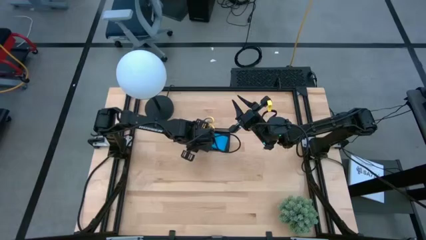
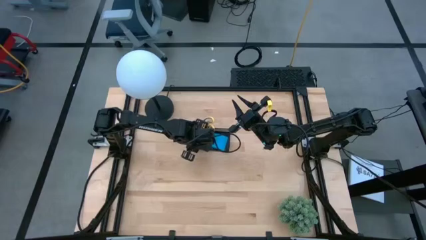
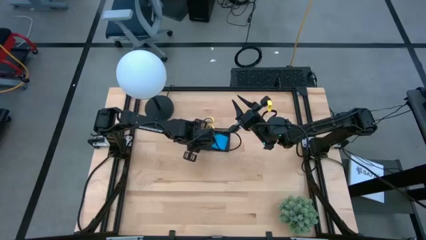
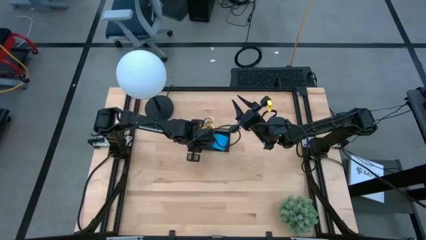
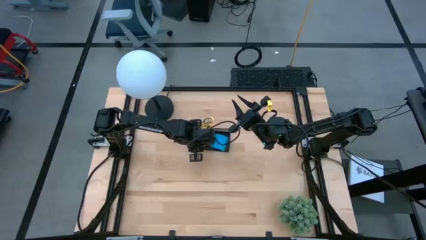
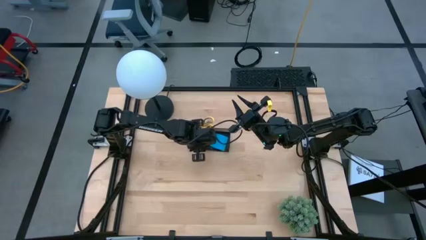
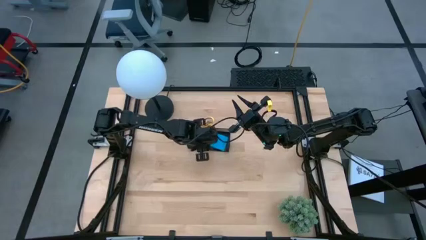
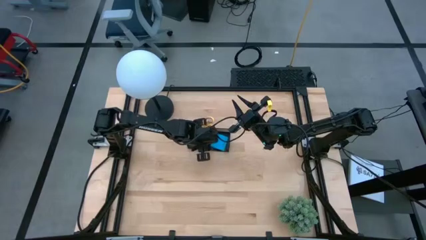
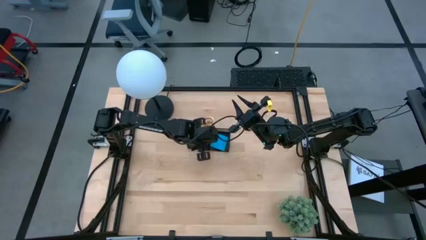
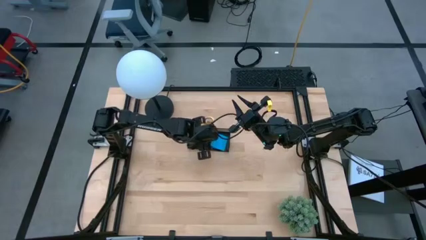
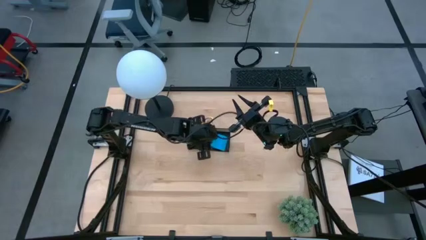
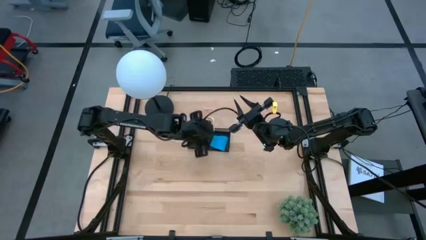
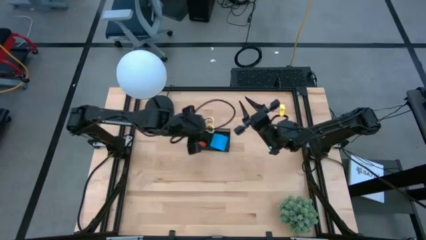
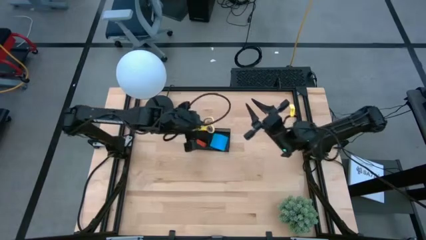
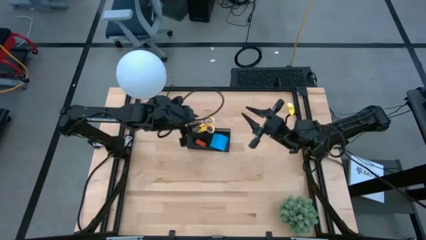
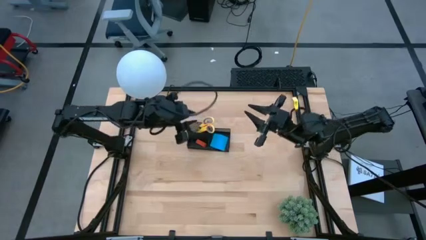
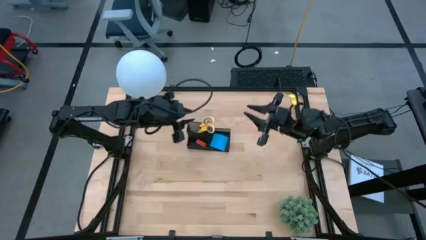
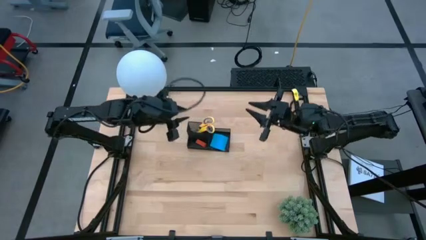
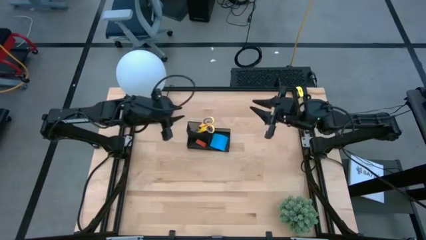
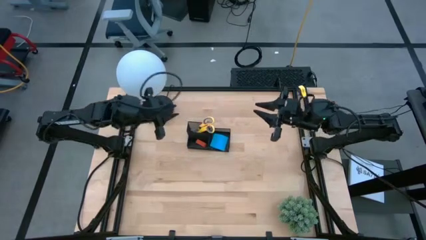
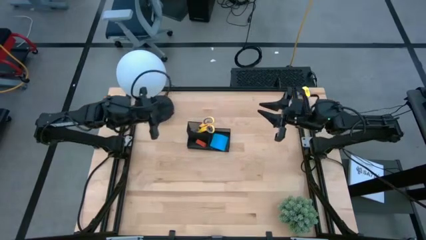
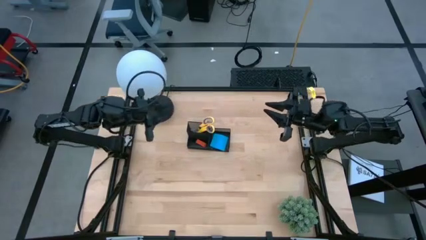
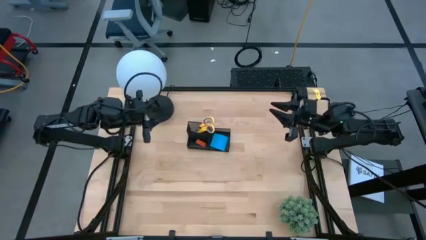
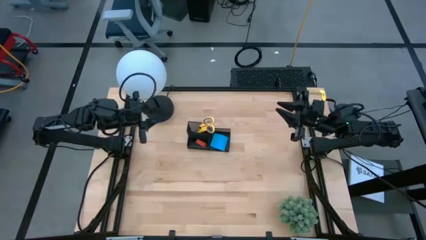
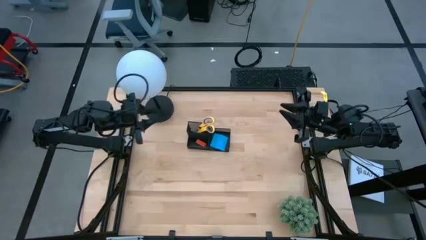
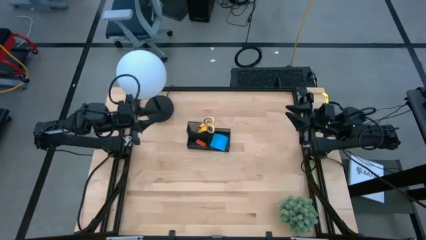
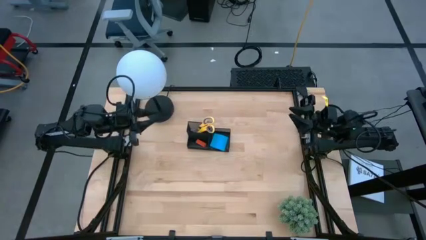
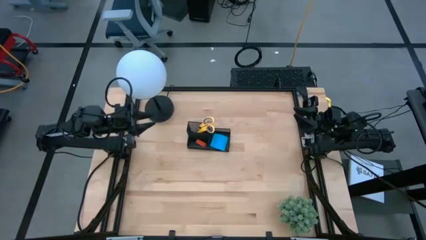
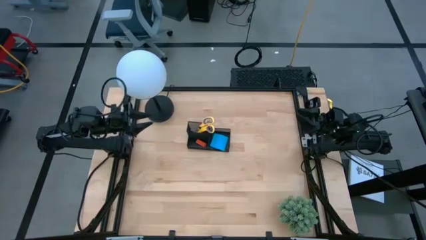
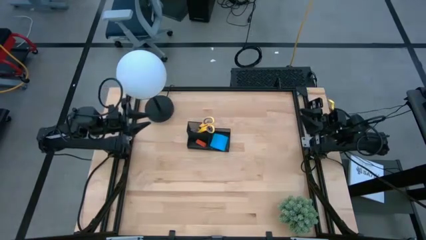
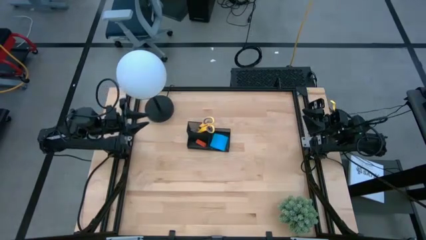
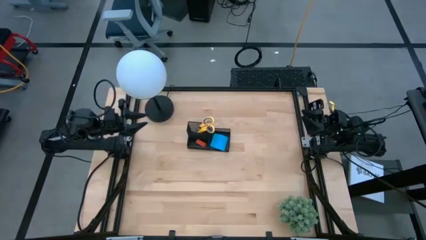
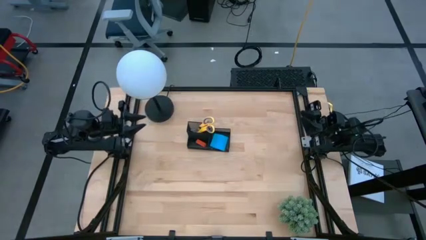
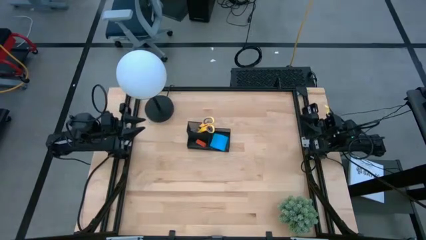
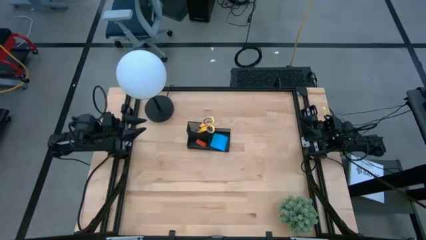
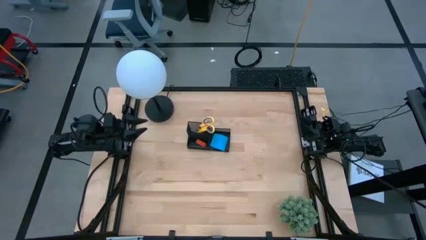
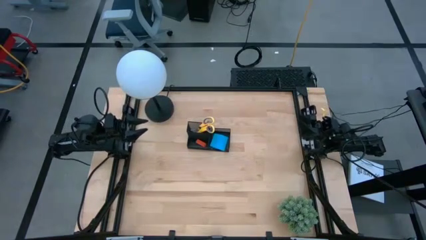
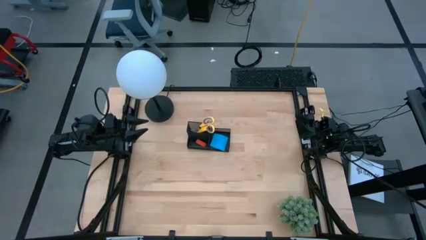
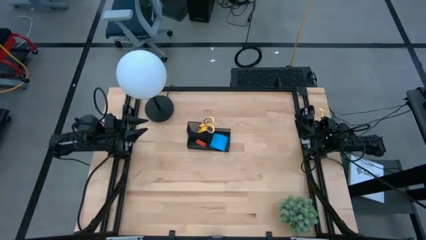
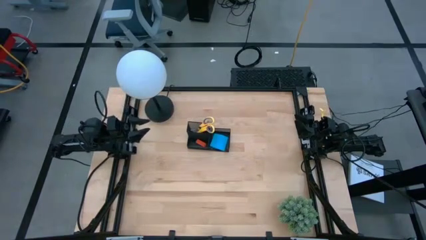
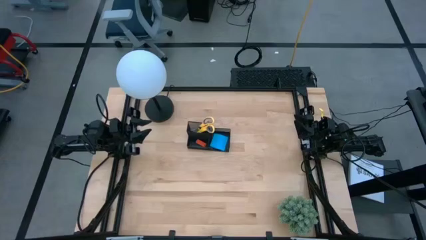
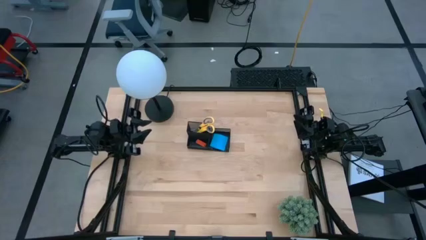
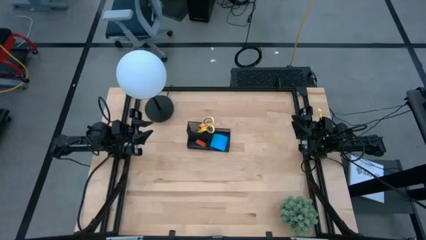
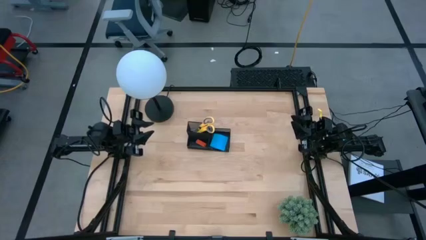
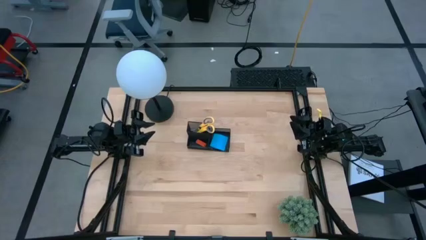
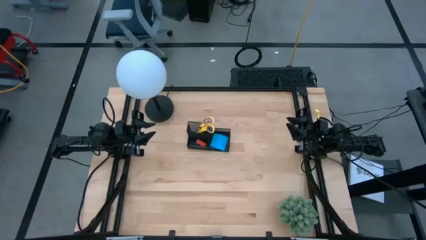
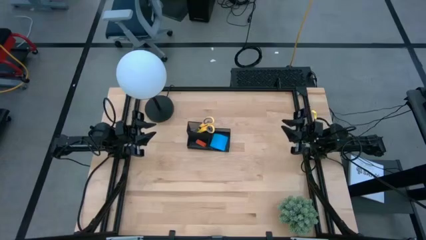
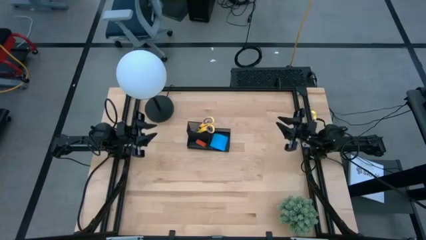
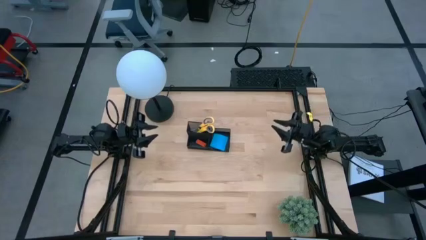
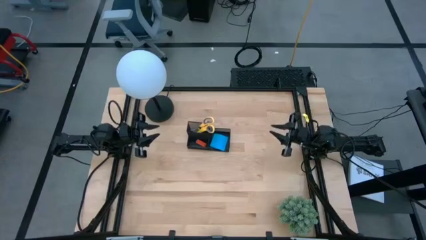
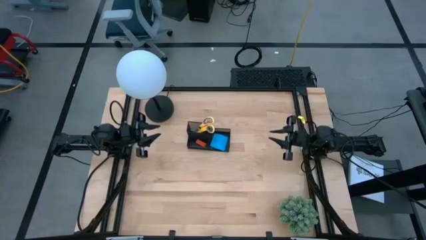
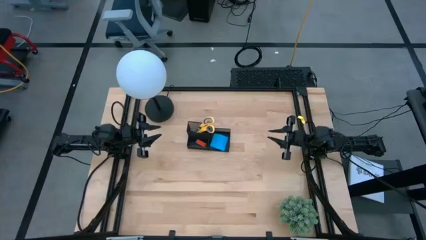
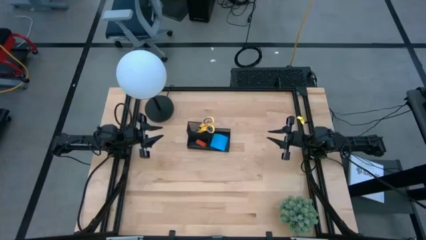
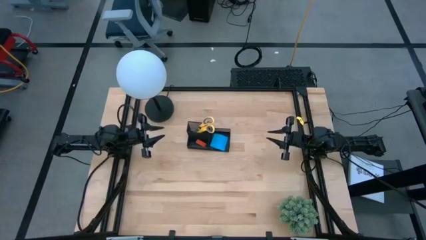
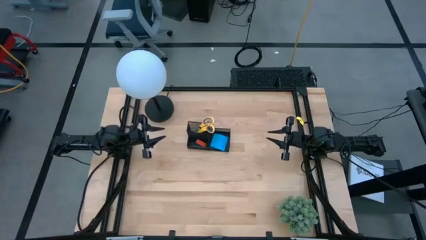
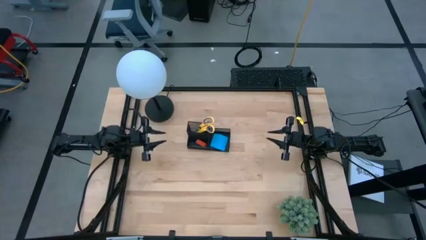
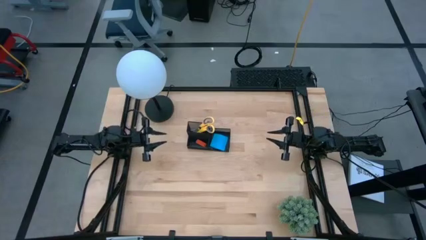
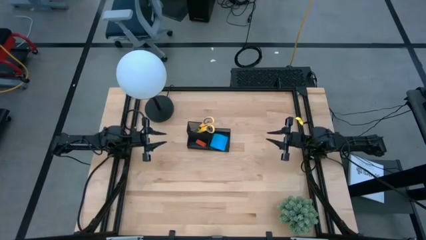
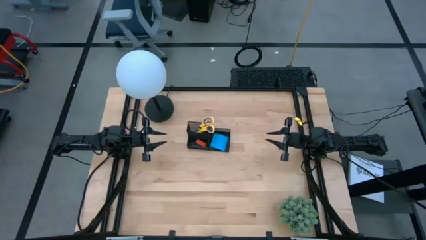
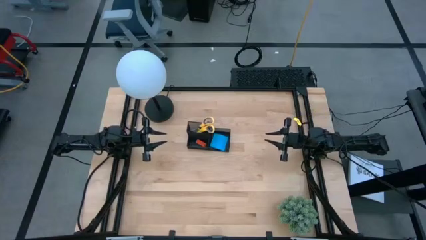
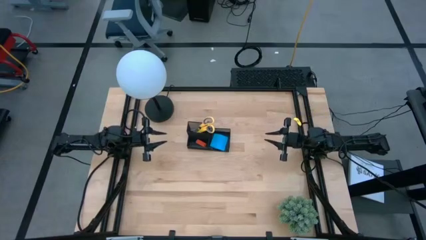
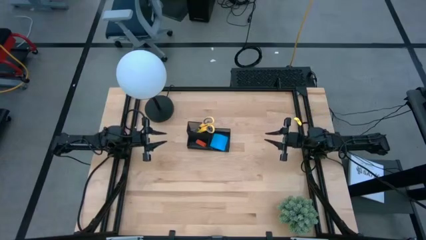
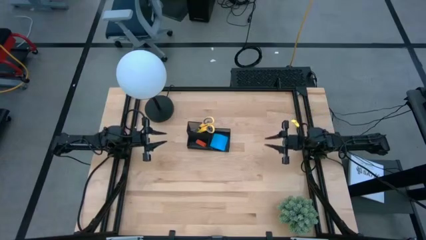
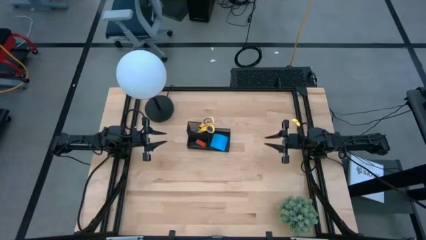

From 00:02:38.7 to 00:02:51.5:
Task: Pick and place office supplies into organizer
Return to Home Position
